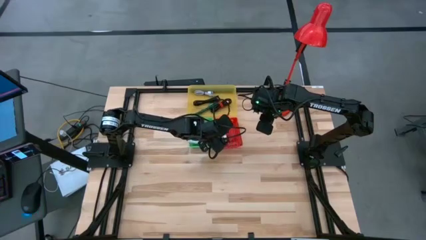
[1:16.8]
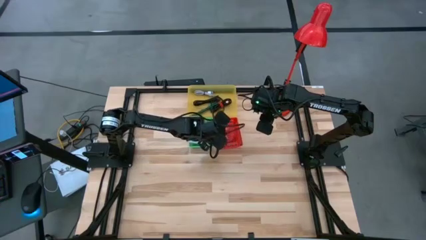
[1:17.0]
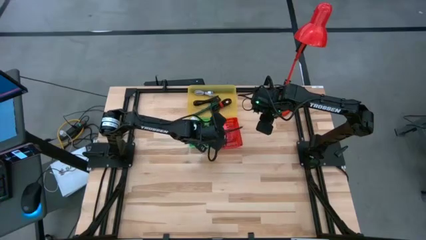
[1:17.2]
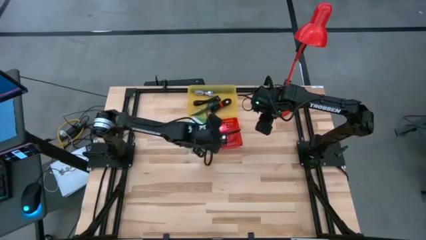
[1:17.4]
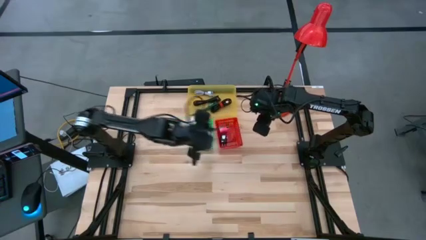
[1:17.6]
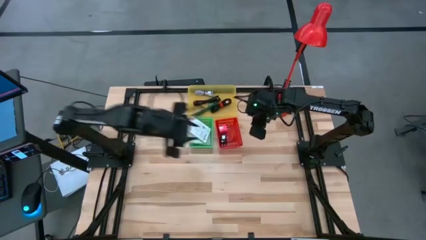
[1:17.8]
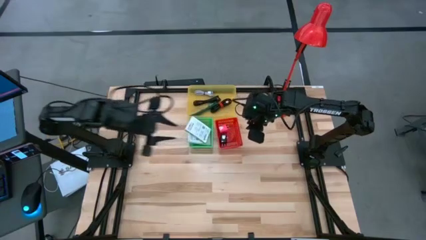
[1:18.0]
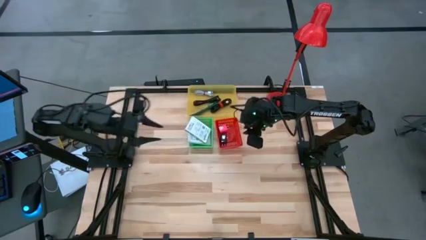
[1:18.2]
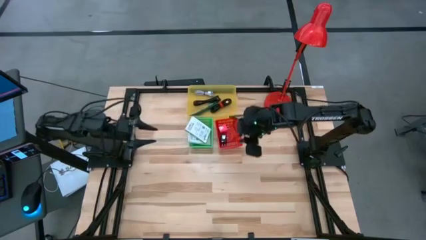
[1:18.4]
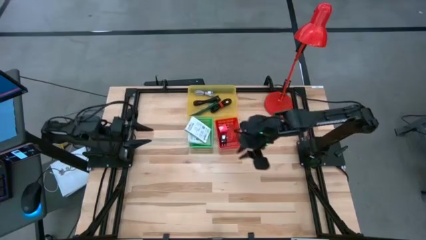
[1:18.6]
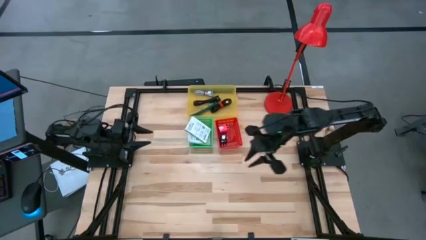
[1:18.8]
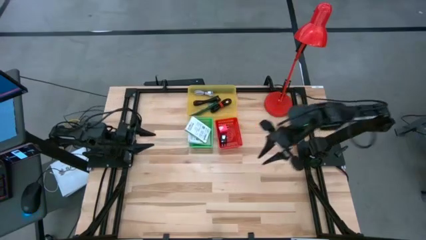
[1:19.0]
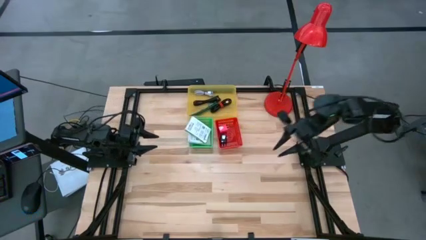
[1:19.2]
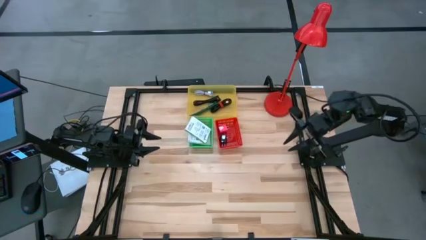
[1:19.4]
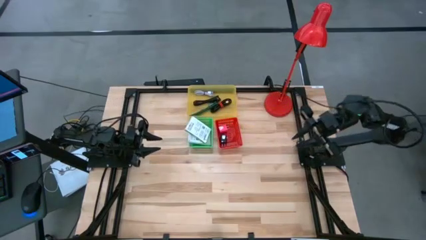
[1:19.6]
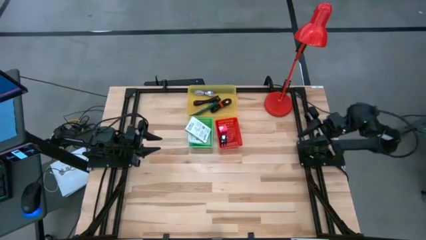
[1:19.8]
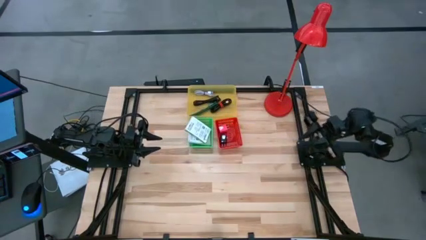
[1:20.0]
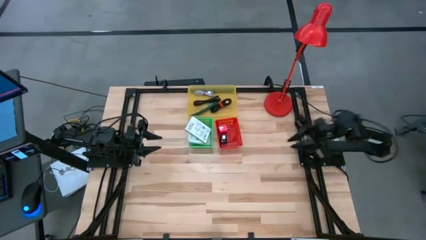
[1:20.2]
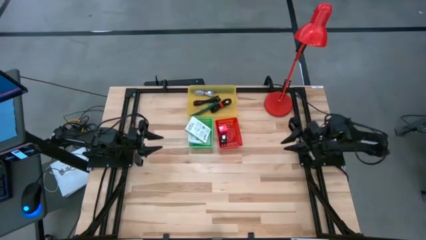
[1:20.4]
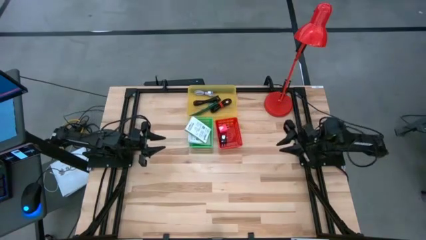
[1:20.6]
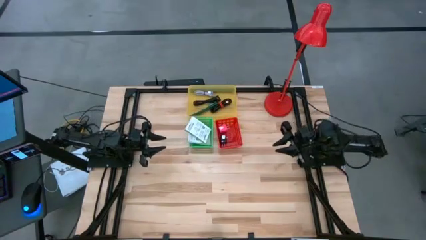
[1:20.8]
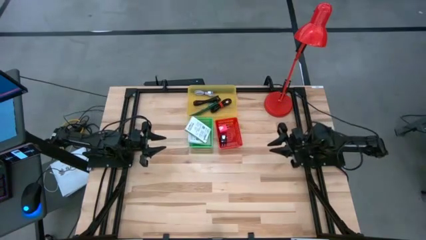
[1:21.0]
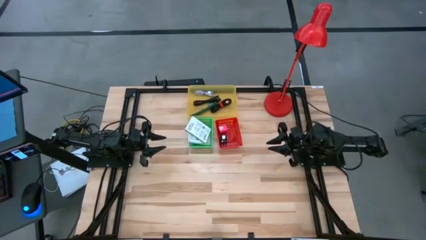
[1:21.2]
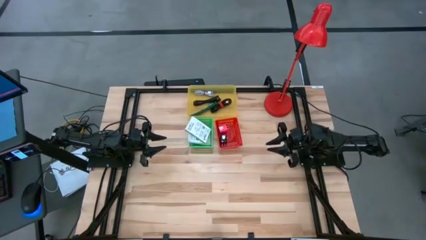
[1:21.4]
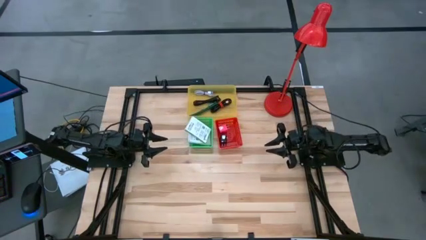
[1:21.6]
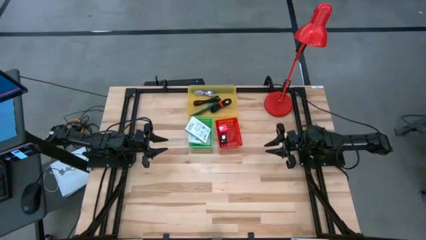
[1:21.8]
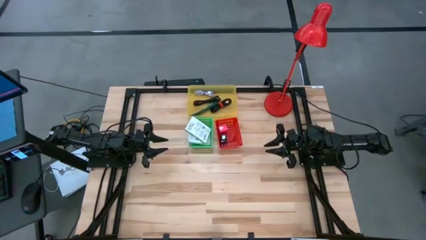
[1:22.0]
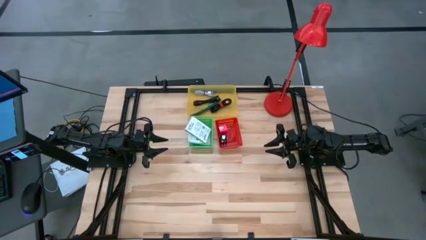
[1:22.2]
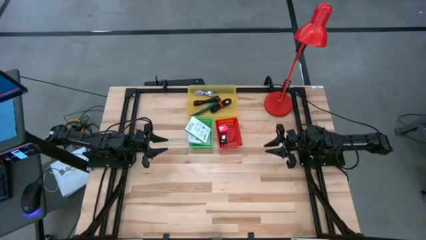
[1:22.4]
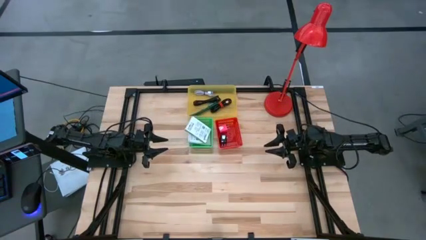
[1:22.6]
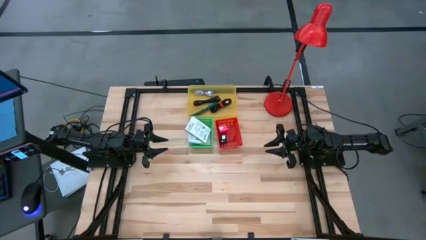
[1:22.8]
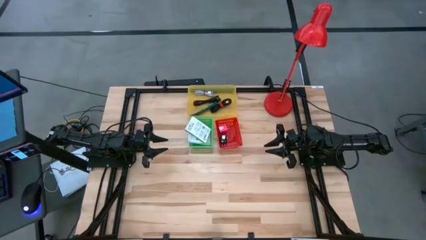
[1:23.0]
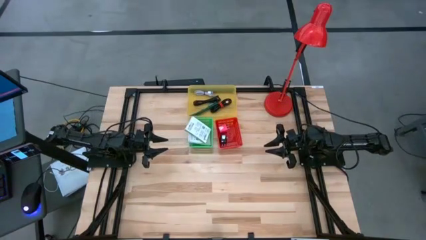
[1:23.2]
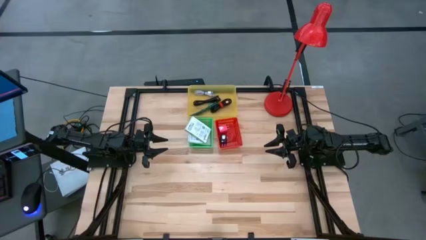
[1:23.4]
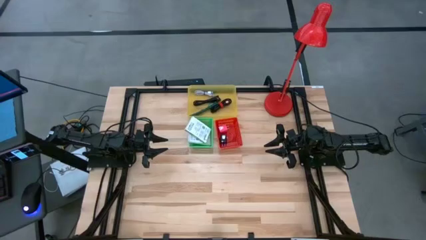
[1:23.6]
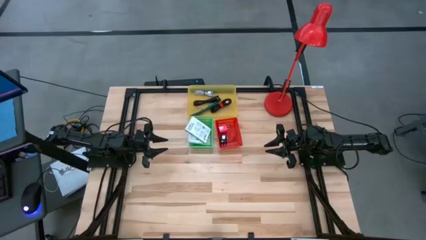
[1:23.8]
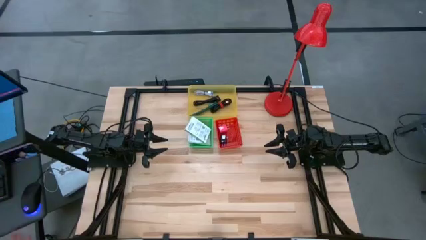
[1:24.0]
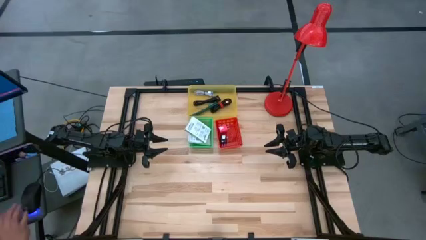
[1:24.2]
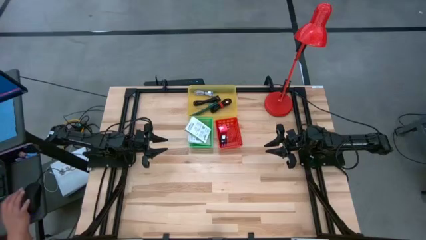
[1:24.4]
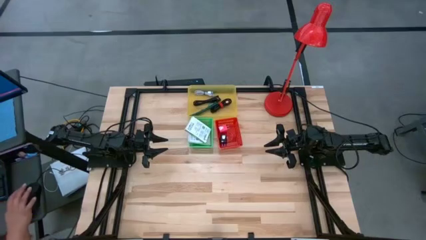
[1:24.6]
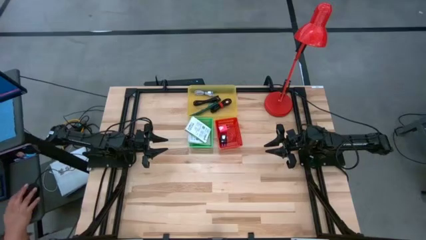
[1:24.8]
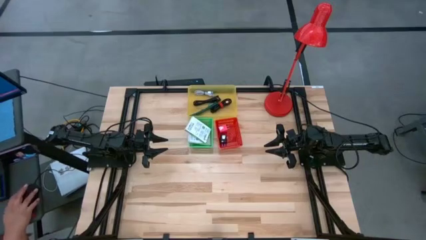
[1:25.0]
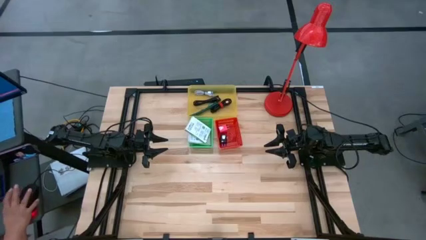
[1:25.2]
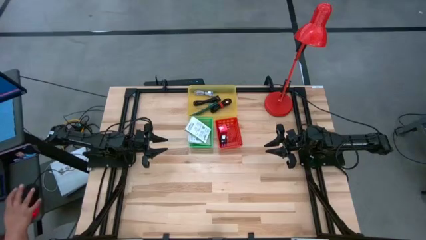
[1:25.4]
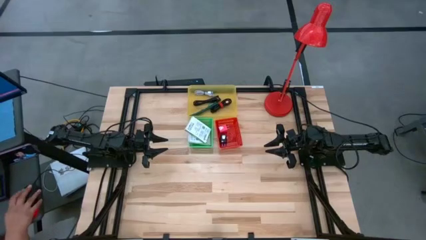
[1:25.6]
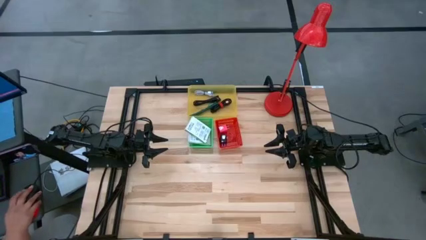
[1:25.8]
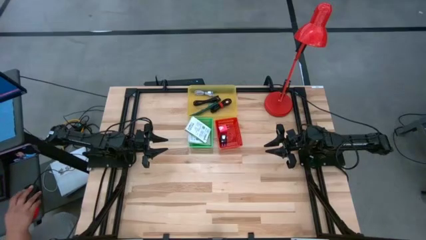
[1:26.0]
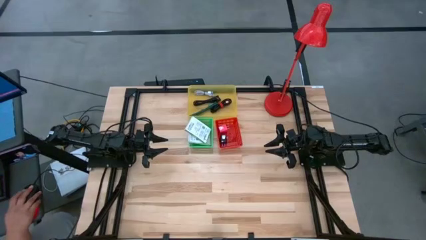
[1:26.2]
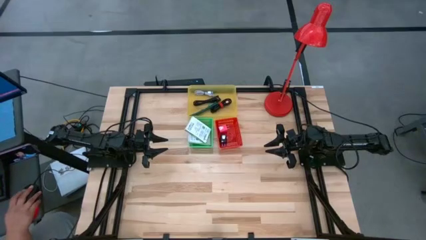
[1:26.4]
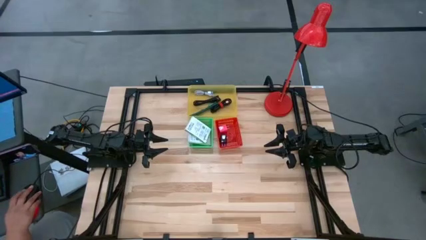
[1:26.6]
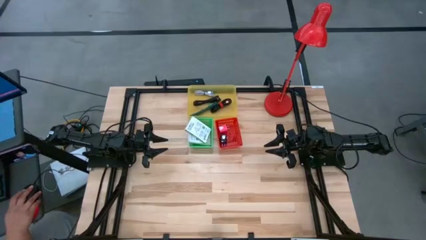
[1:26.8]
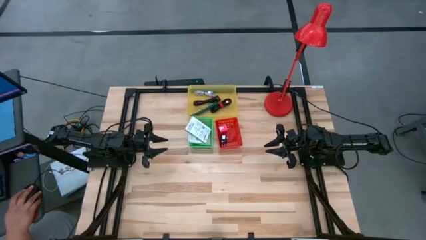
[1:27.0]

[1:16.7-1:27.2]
Task: Pick and place items into bin
Return to Home Position

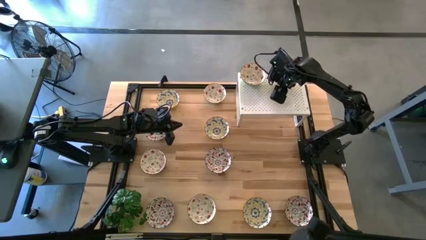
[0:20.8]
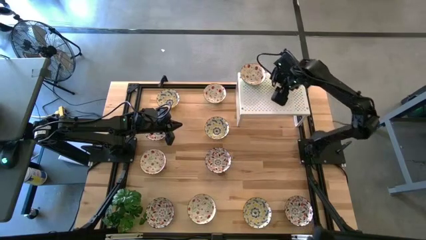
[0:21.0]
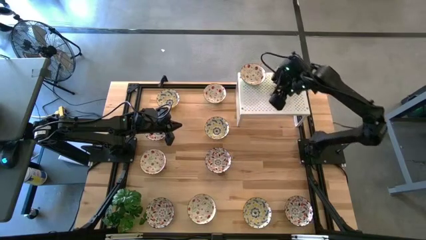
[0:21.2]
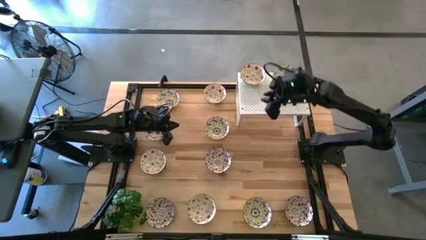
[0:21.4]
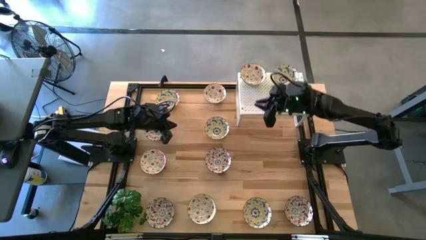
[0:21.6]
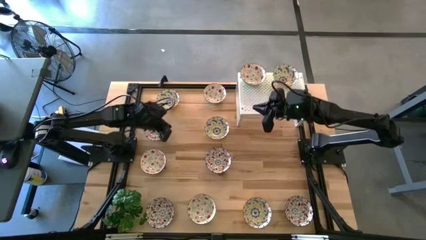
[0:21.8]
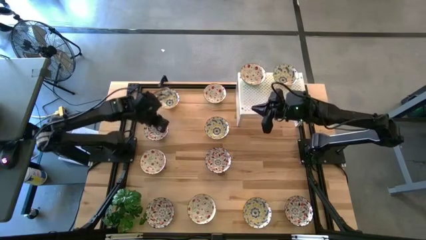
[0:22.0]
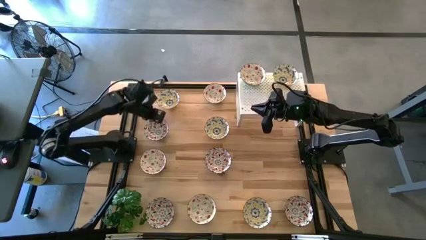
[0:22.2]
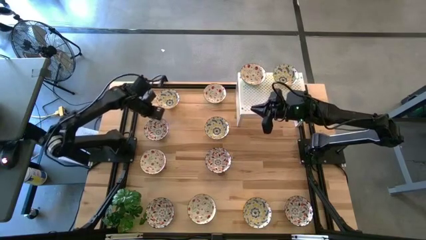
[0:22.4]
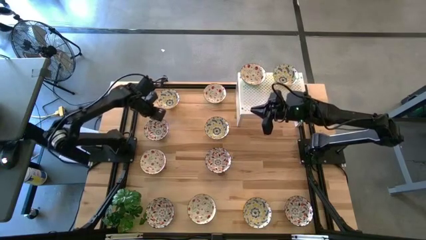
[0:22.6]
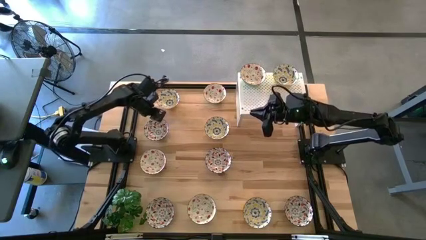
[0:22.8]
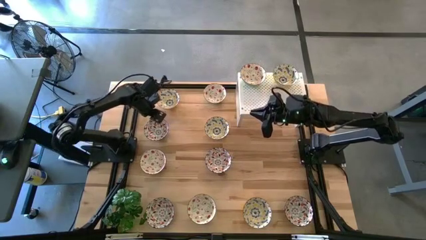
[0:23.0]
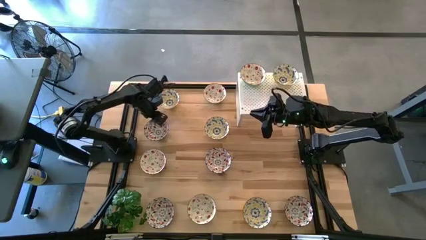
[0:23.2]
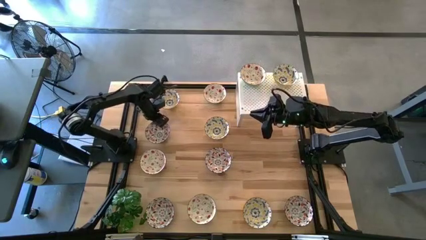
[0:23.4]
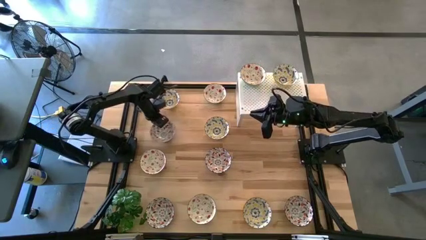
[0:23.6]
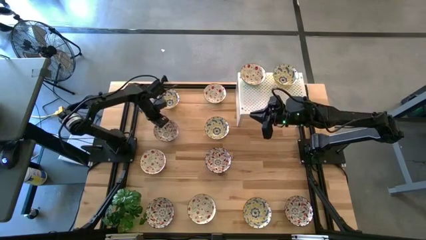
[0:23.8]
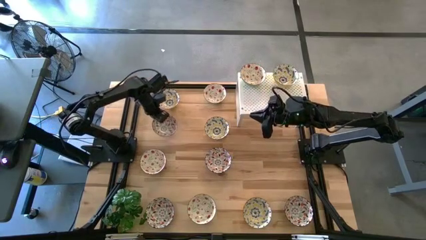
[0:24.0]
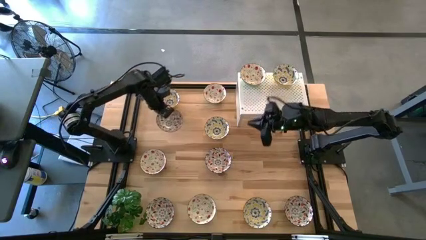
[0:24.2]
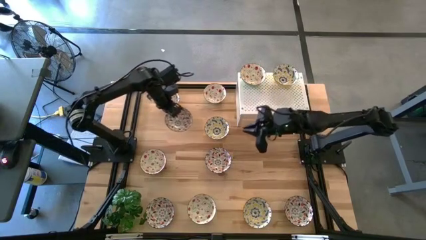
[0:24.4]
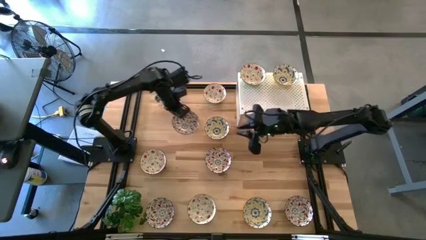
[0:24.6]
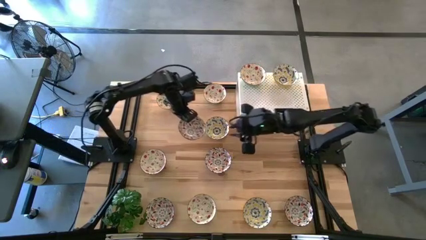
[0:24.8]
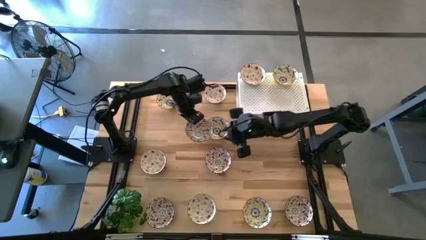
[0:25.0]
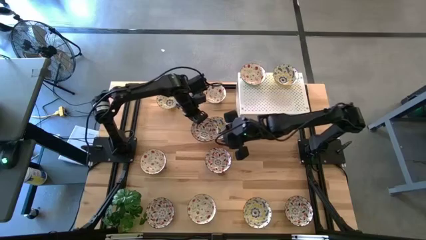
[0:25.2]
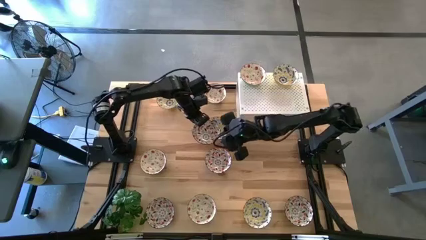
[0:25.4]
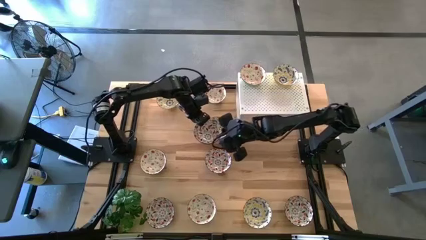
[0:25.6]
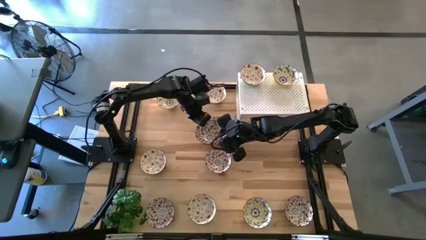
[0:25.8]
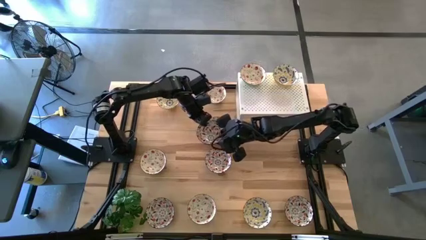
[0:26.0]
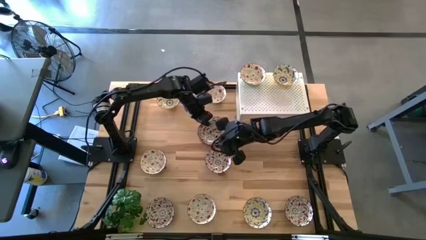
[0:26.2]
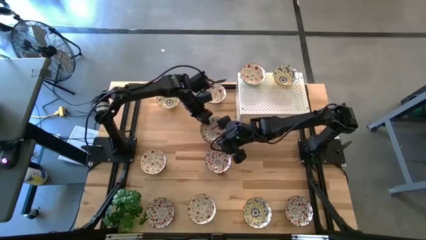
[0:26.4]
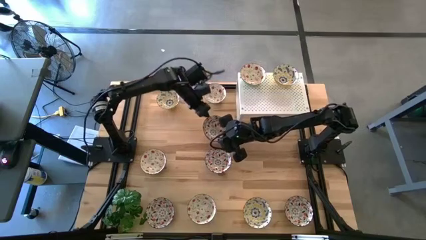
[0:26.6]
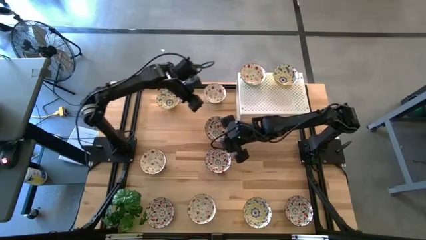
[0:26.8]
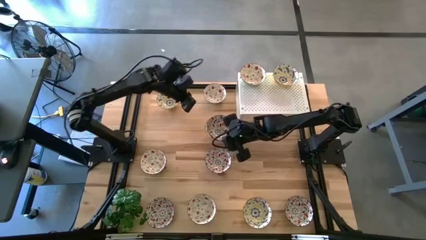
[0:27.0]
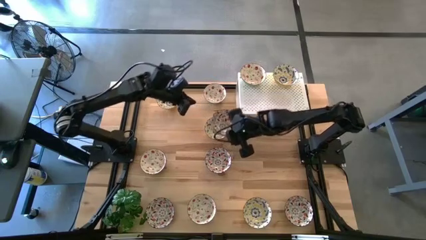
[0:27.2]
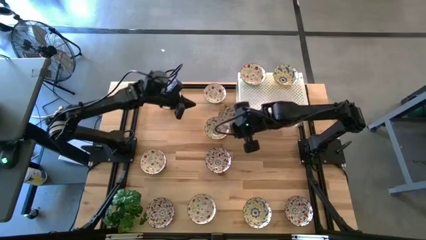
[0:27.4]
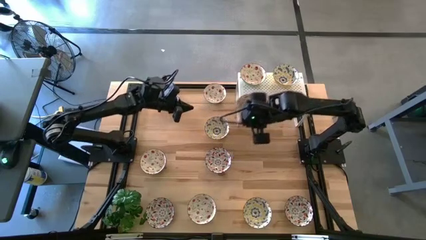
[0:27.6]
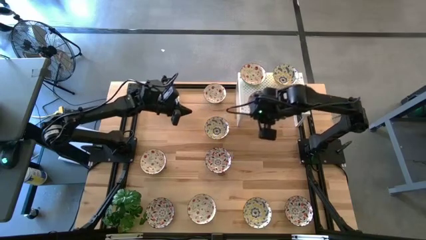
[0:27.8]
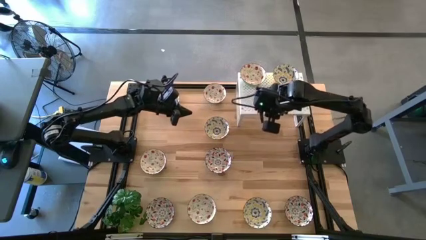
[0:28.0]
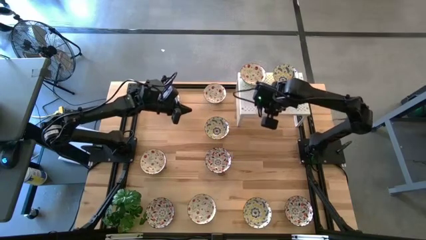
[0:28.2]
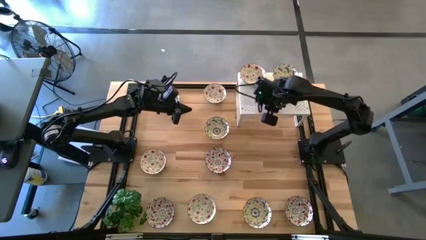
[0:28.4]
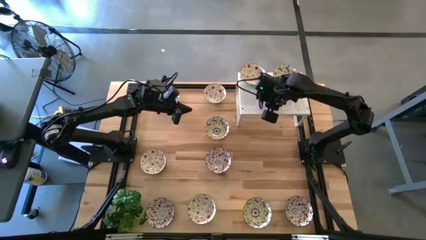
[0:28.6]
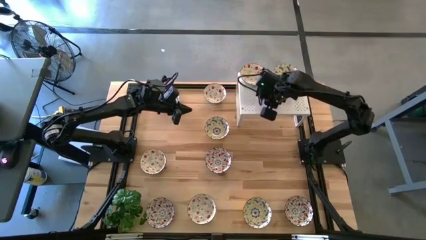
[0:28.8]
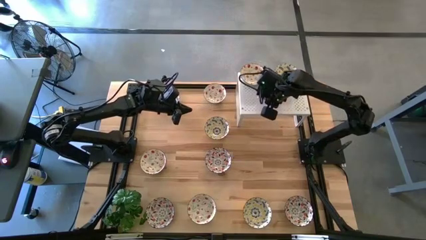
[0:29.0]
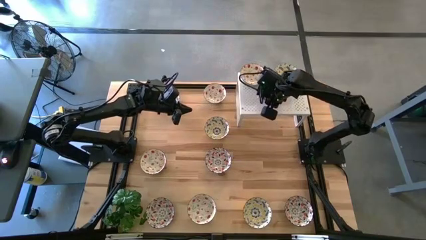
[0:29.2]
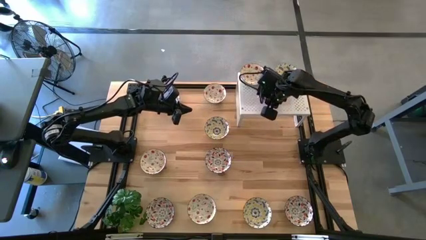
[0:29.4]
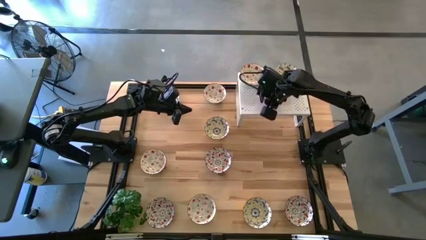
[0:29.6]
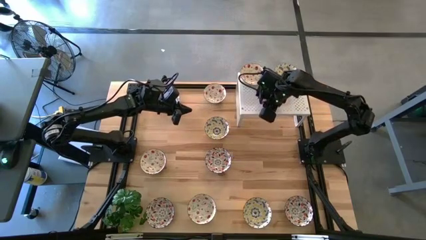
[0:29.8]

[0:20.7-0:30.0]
Task: Pick & Place Mini bowls
Put the black patterned bowl on the shelf
